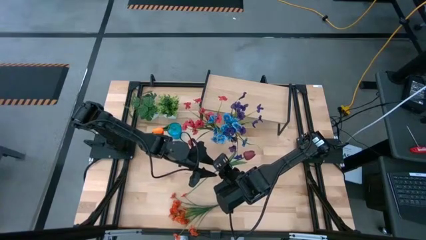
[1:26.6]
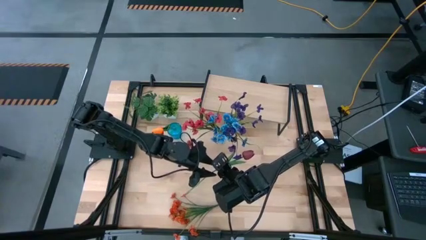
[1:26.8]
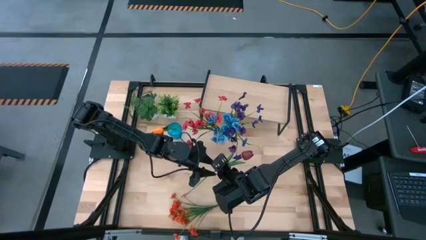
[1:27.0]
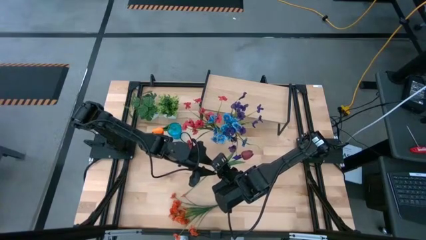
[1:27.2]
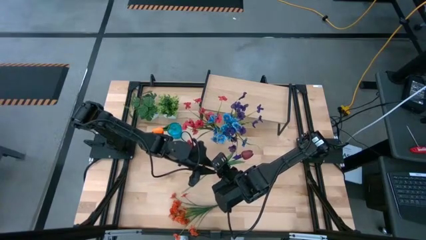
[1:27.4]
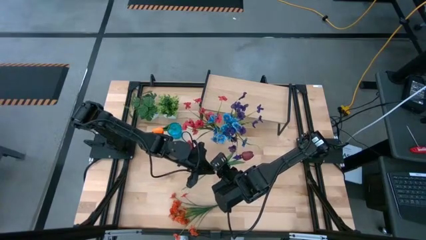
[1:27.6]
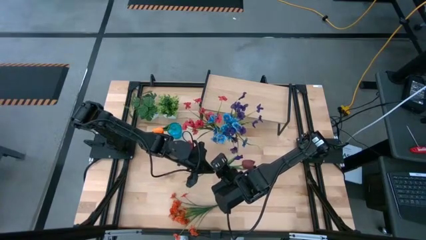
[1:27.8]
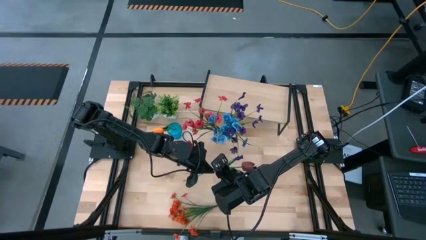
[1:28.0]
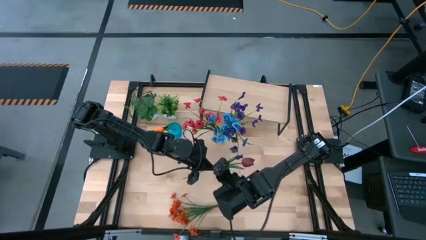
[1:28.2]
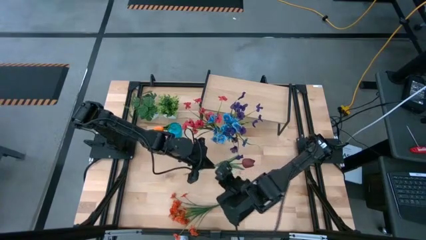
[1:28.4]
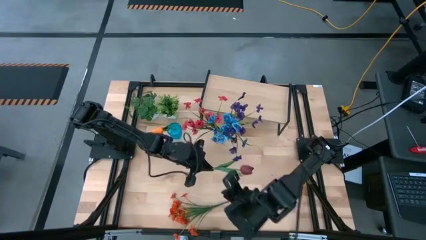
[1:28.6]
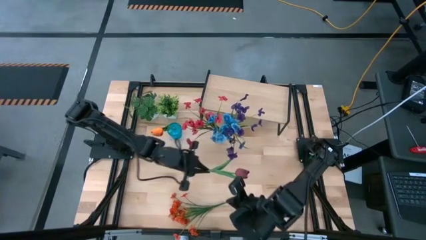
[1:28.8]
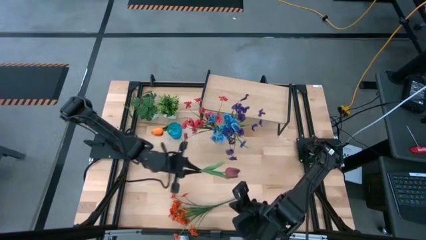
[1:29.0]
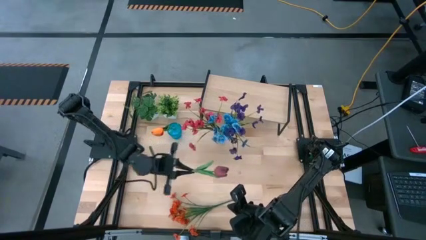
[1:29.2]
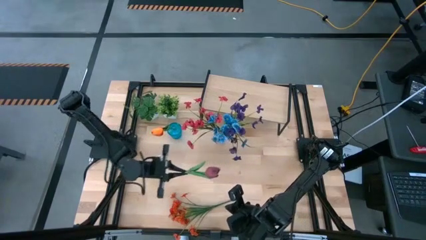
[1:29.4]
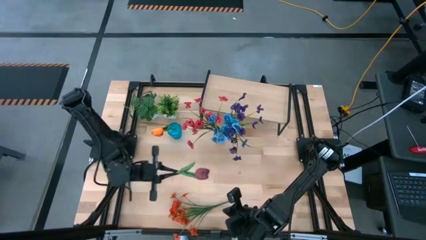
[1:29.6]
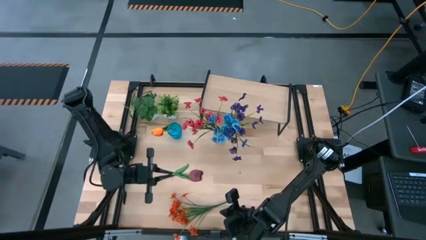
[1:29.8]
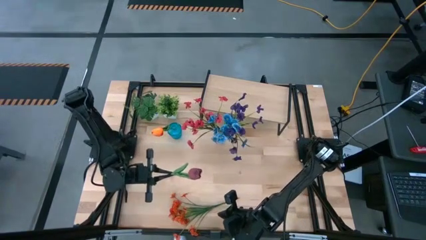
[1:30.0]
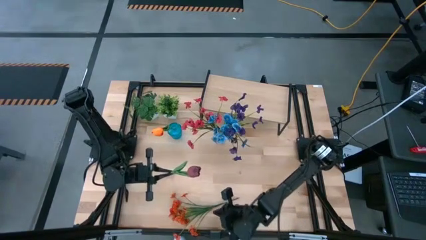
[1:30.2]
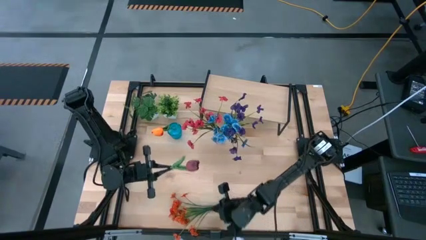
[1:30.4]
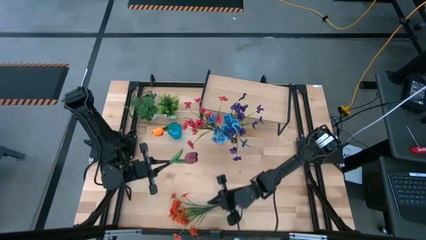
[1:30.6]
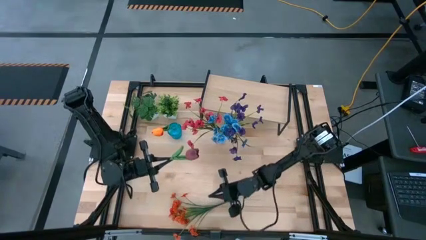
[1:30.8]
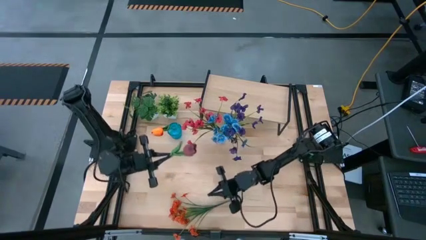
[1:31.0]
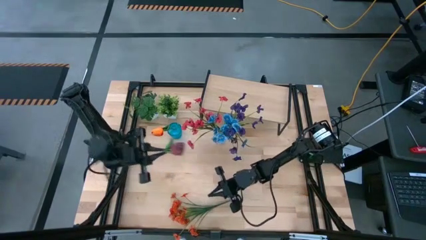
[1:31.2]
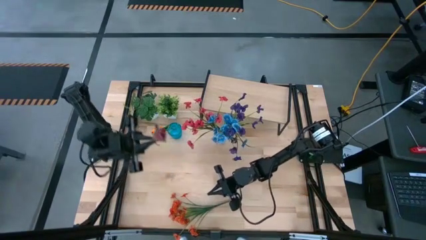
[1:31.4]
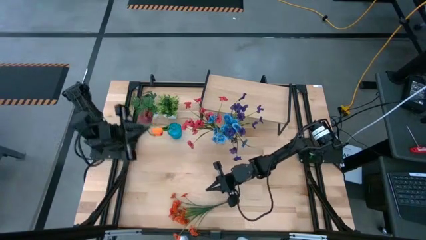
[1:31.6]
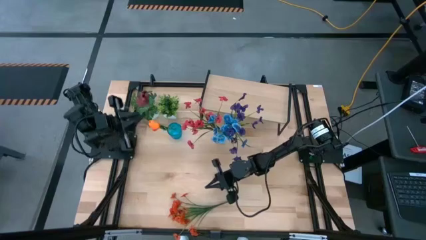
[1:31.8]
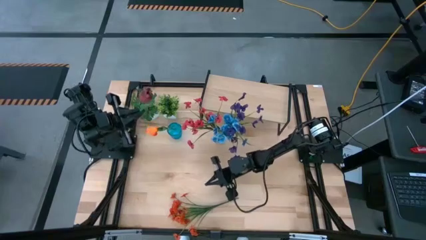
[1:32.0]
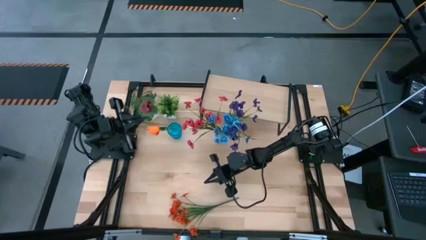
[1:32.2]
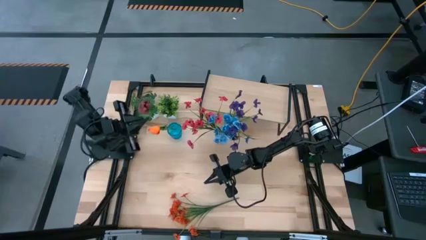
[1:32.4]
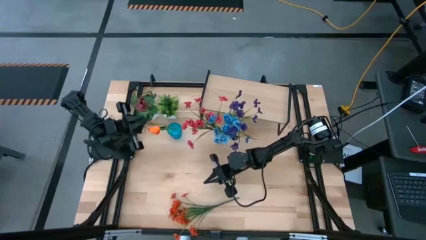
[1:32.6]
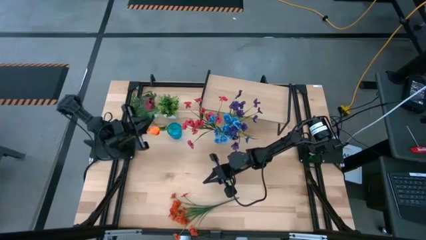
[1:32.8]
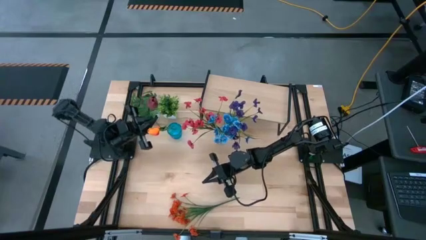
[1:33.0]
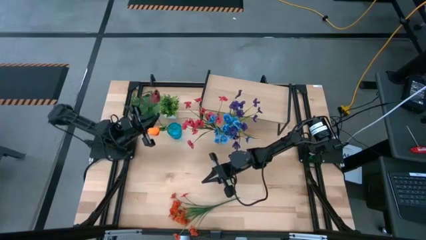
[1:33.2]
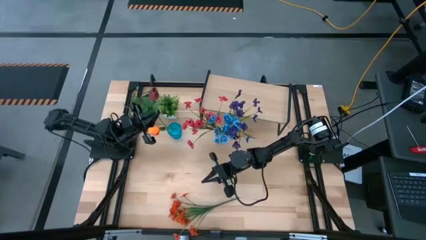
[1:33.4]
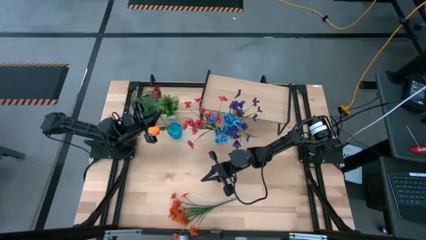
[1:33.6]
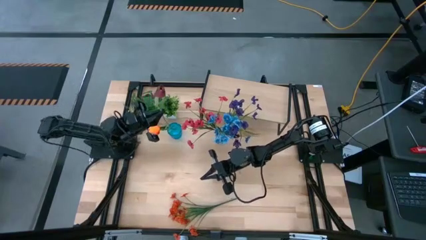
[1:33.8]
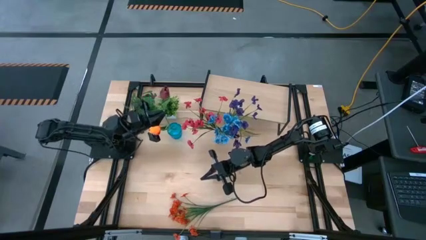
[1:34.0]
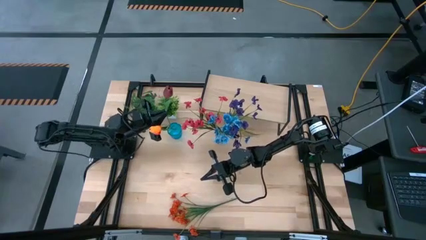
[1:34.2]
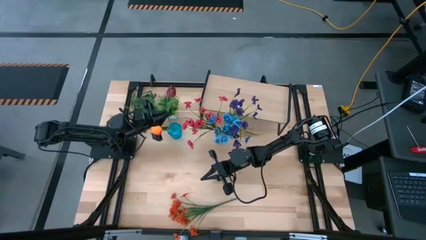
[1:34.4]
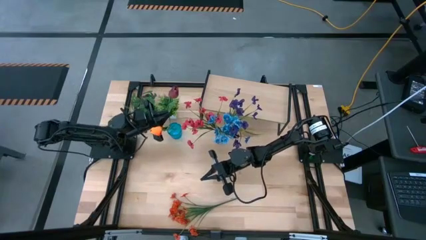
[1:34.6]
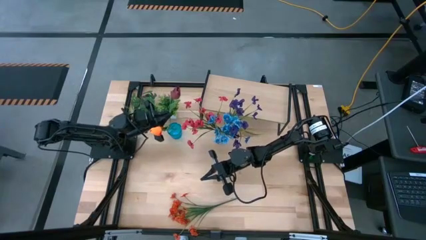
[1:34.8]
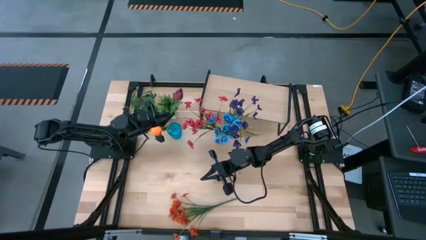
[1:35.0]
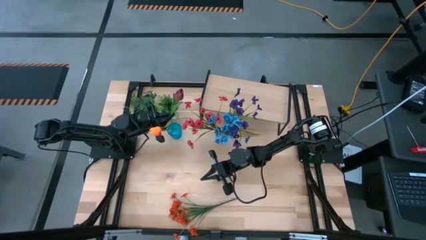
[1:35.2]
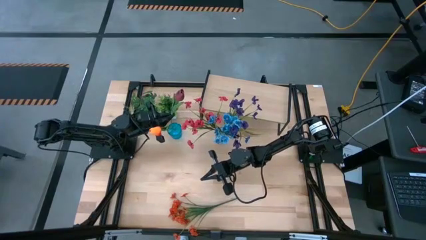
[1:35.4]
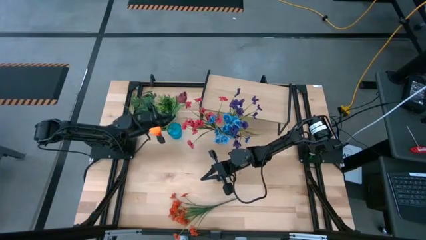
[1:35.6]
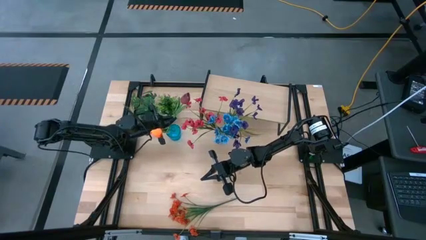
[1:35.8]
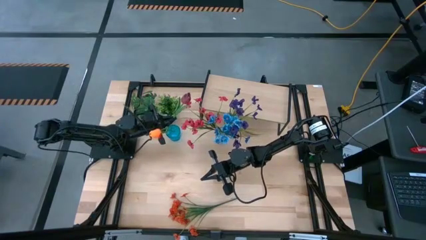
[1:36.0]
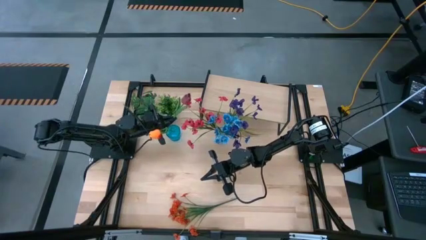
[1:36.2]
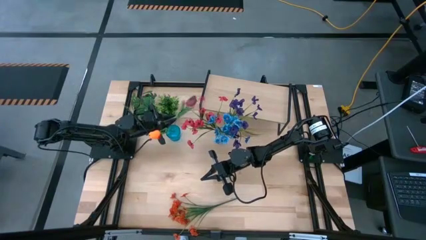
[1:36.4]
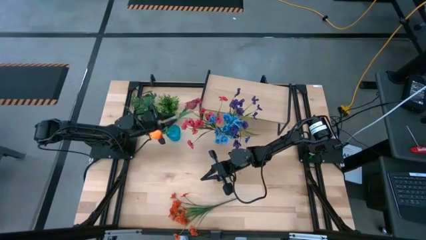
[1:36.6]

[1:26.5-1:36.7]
Task: Pick and place flowers into a vace then onto a shelf
Put the dark red tulip into the blue vase
